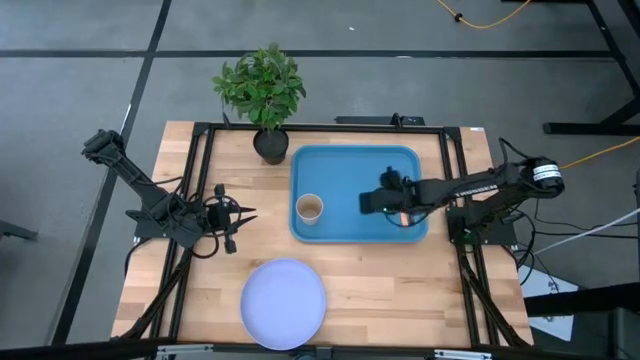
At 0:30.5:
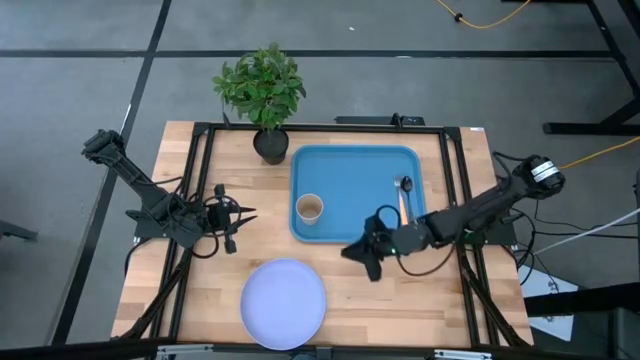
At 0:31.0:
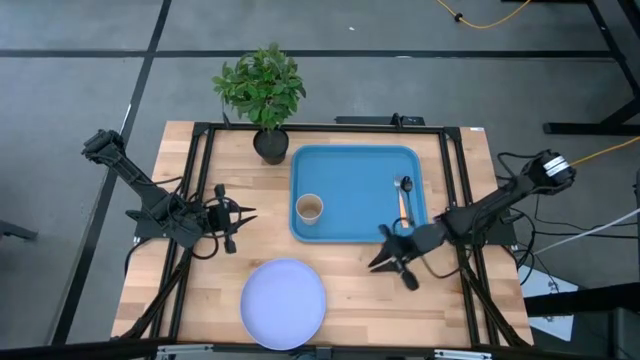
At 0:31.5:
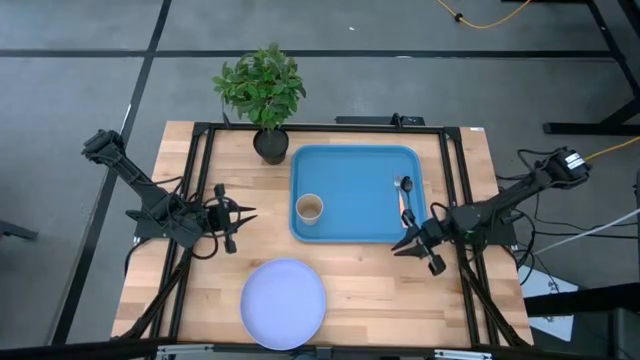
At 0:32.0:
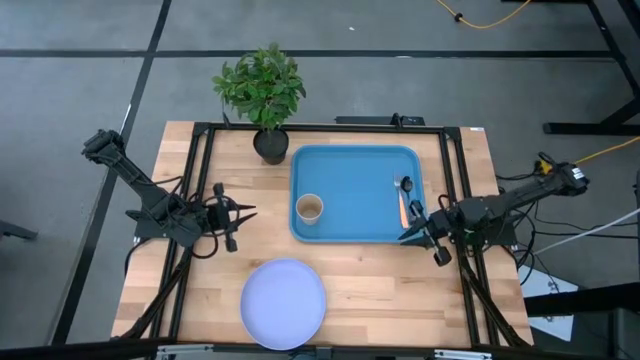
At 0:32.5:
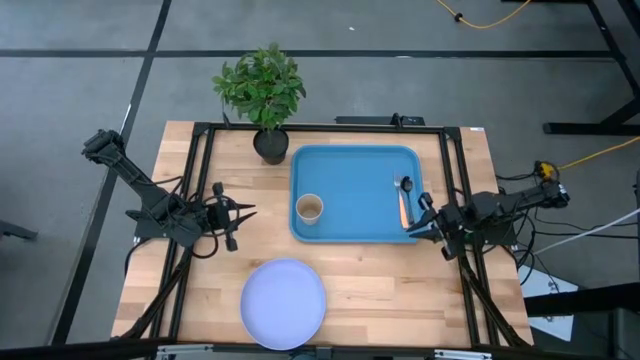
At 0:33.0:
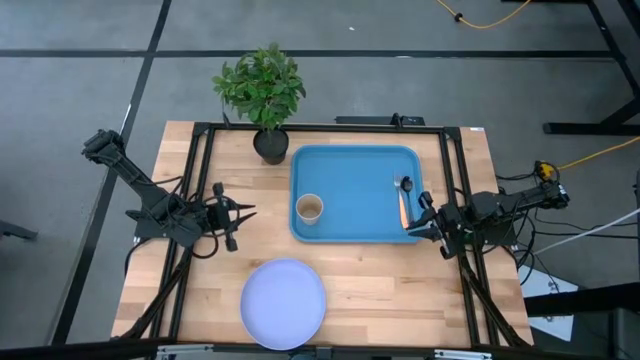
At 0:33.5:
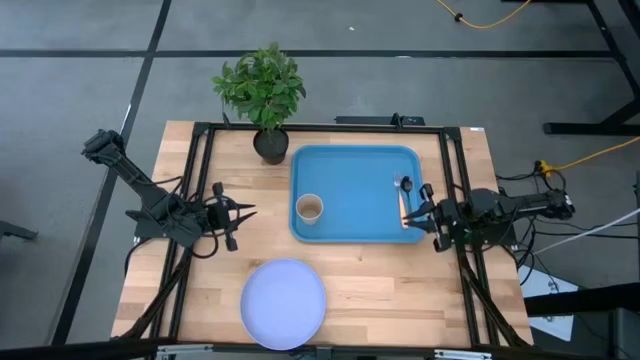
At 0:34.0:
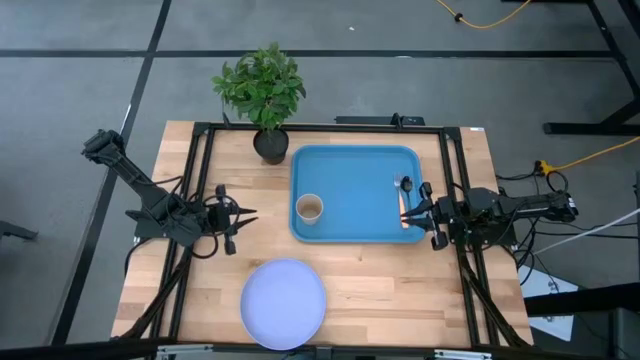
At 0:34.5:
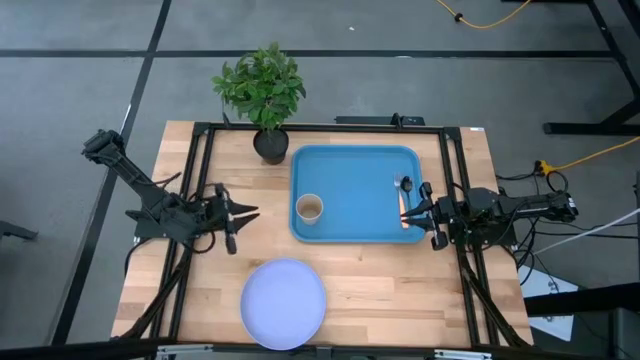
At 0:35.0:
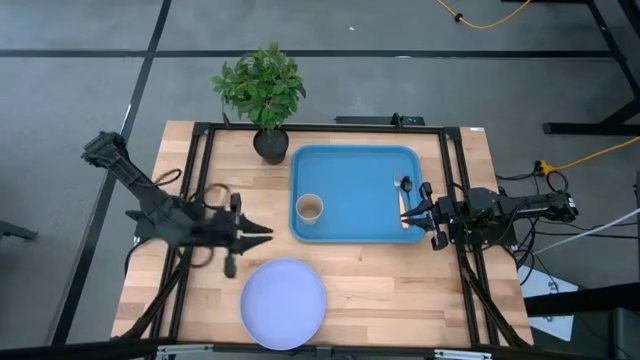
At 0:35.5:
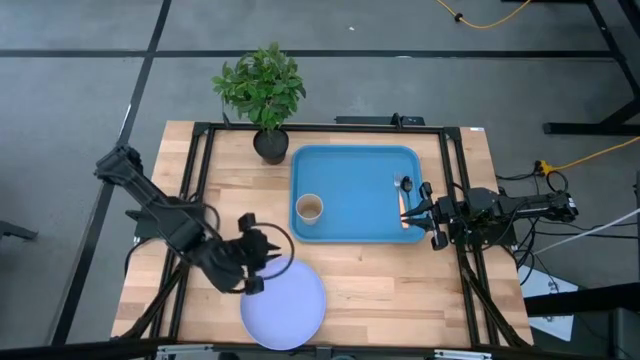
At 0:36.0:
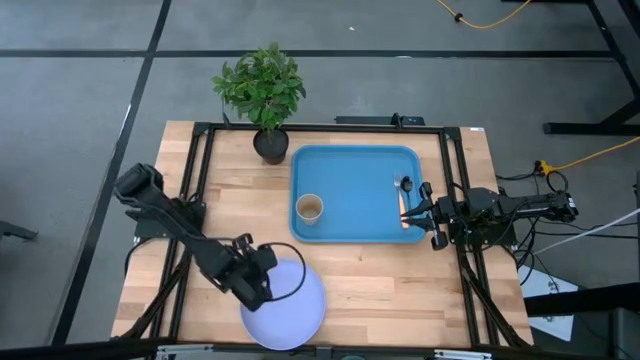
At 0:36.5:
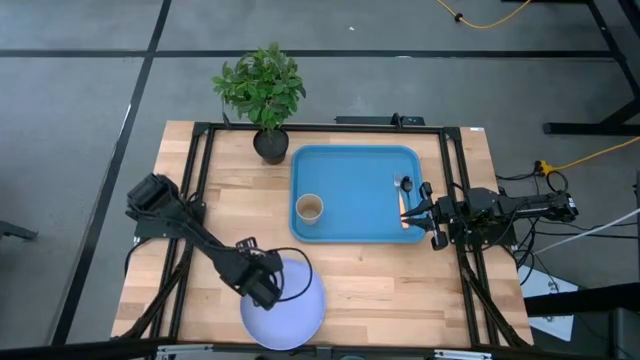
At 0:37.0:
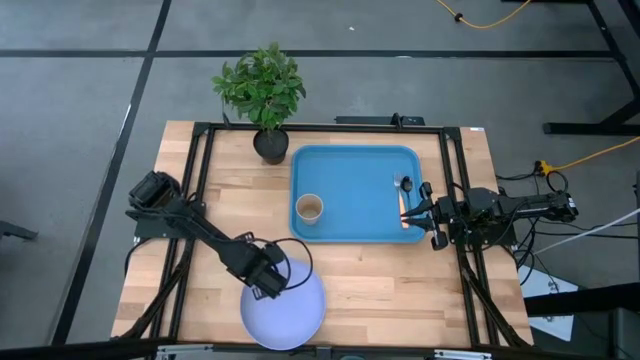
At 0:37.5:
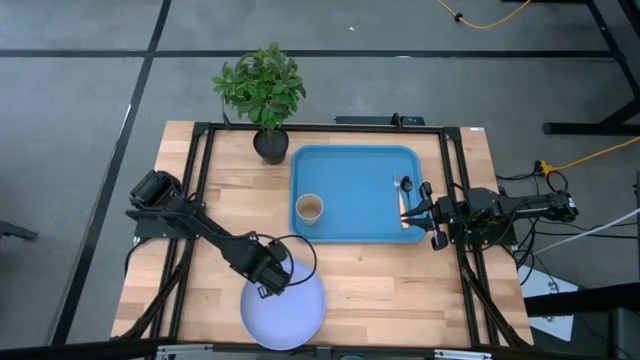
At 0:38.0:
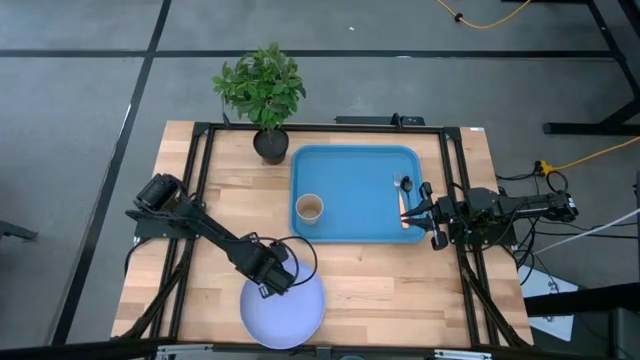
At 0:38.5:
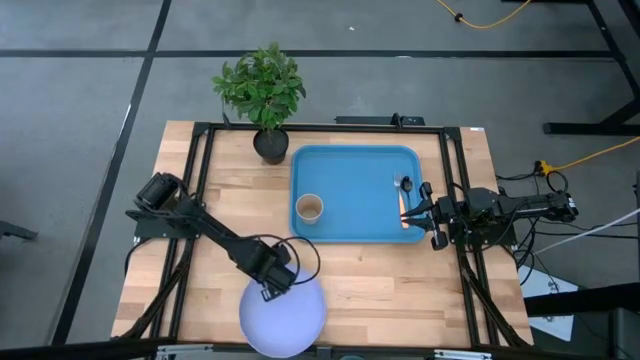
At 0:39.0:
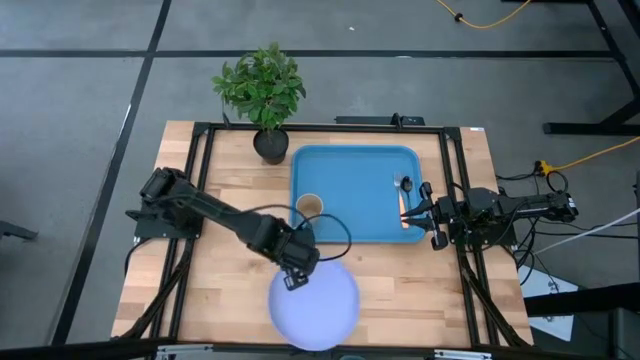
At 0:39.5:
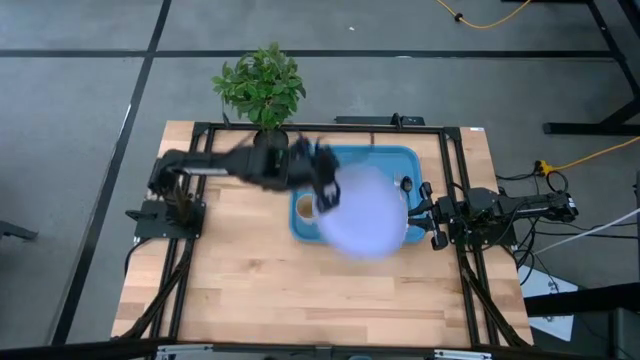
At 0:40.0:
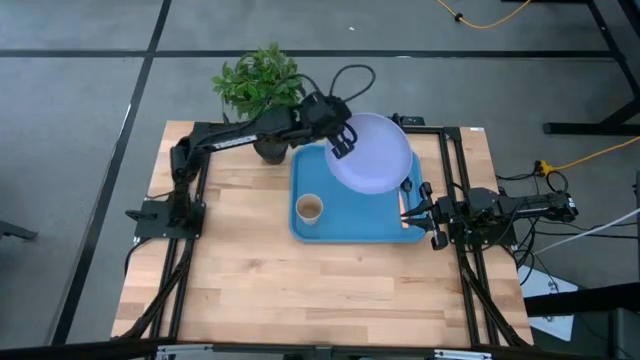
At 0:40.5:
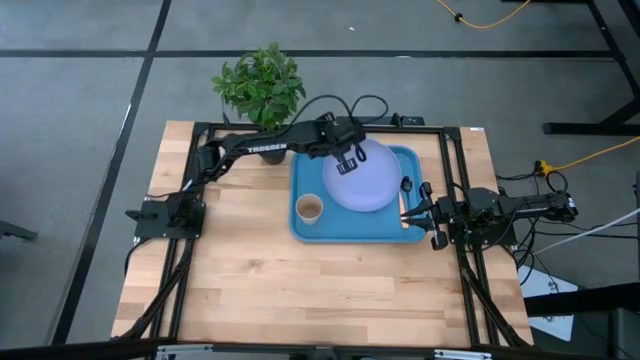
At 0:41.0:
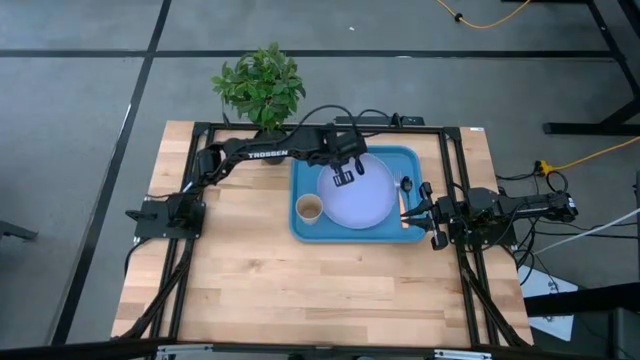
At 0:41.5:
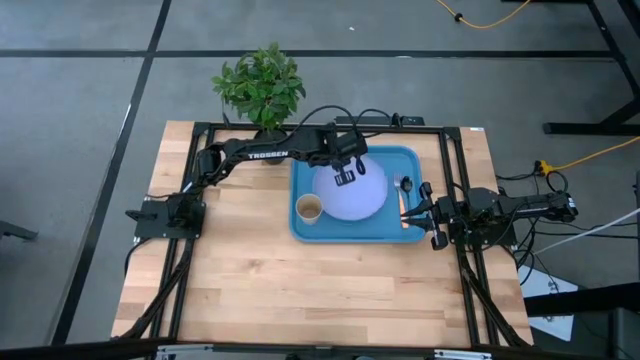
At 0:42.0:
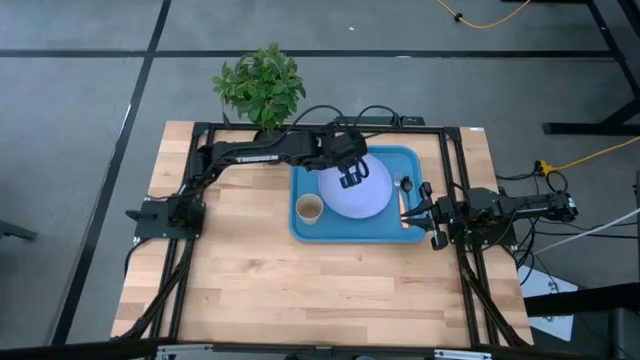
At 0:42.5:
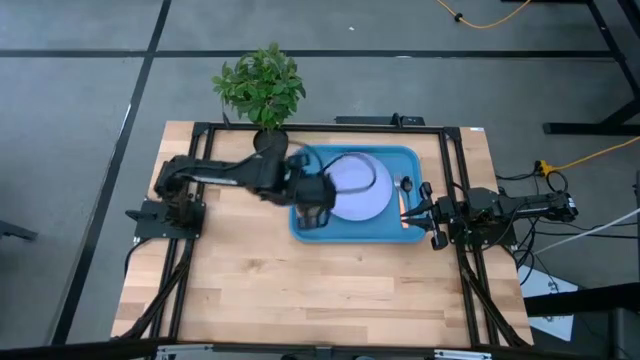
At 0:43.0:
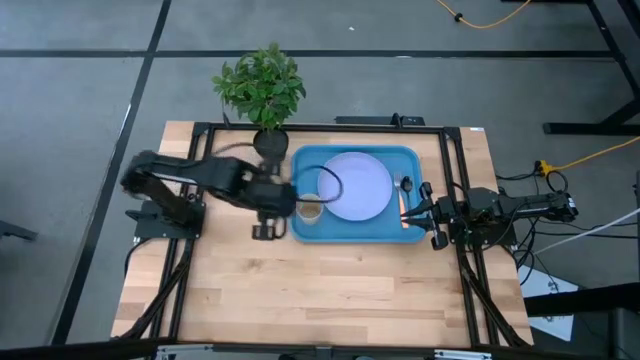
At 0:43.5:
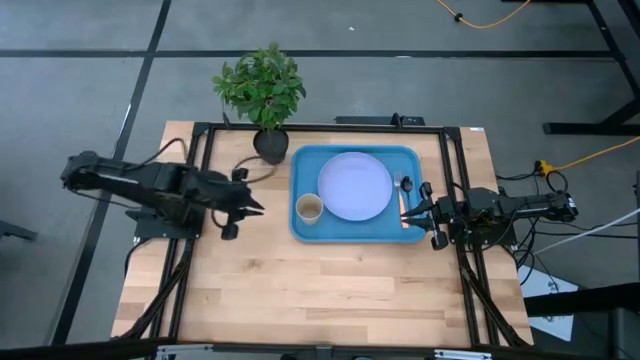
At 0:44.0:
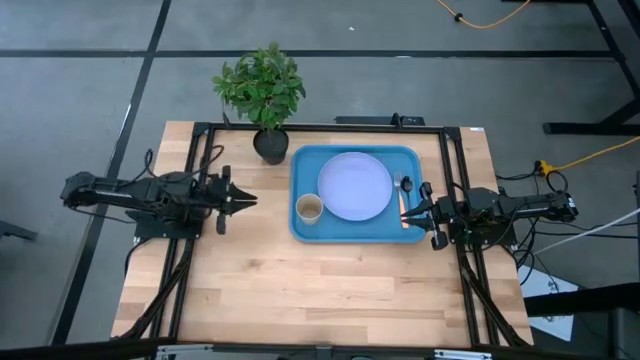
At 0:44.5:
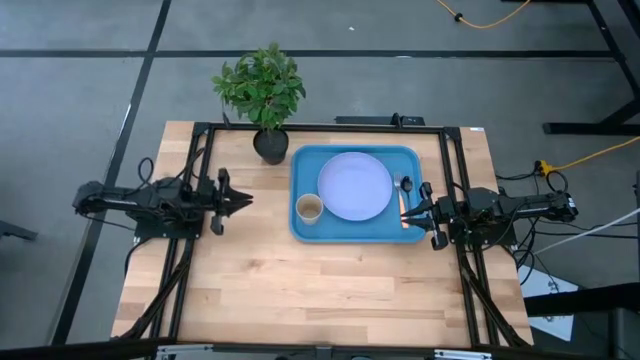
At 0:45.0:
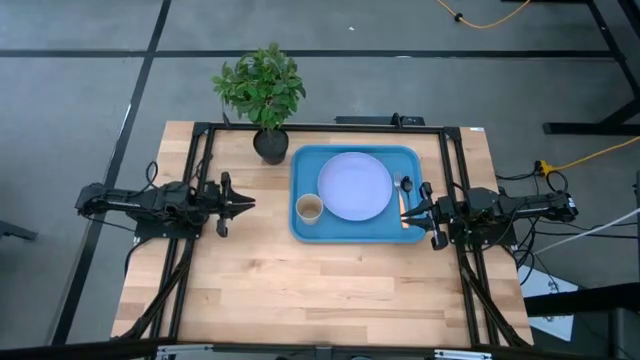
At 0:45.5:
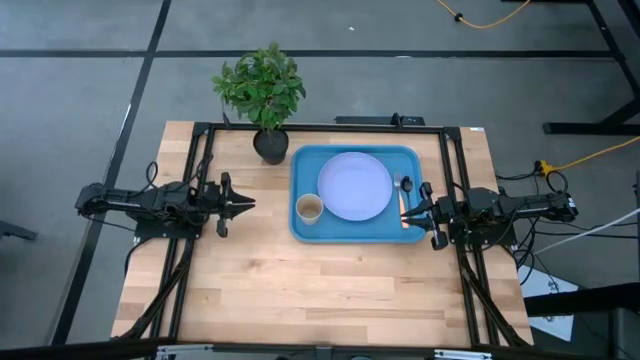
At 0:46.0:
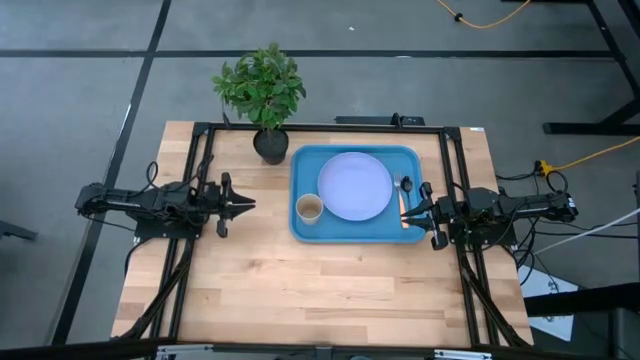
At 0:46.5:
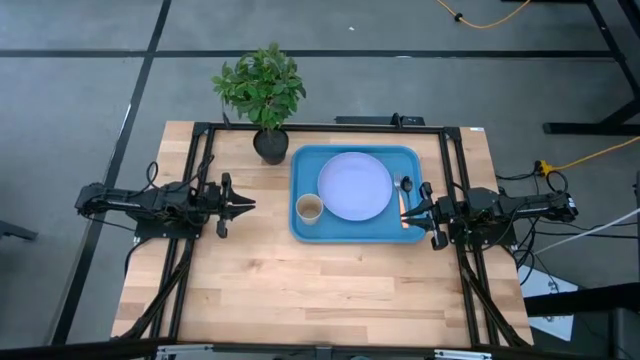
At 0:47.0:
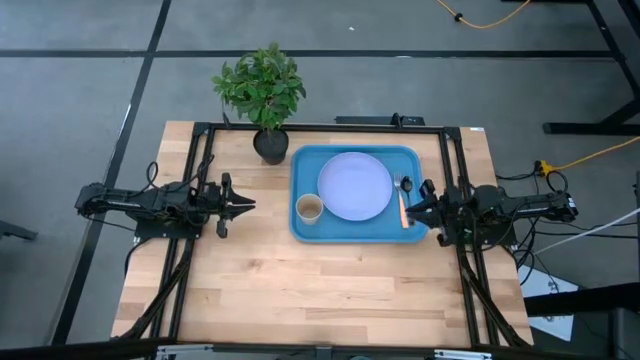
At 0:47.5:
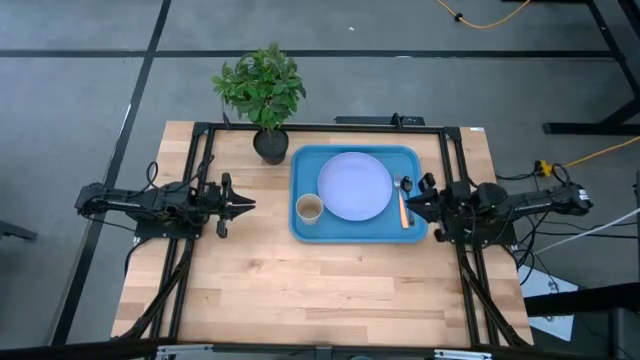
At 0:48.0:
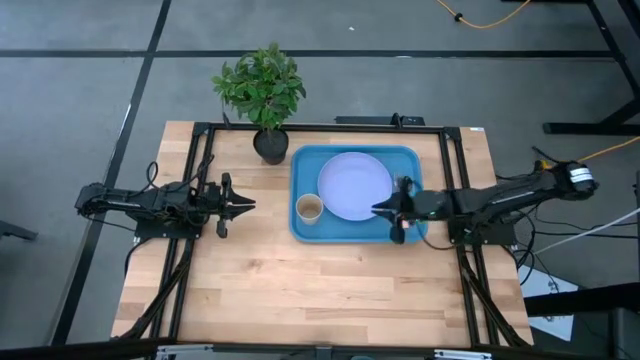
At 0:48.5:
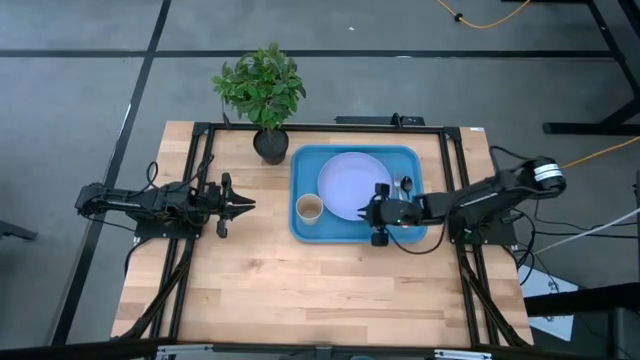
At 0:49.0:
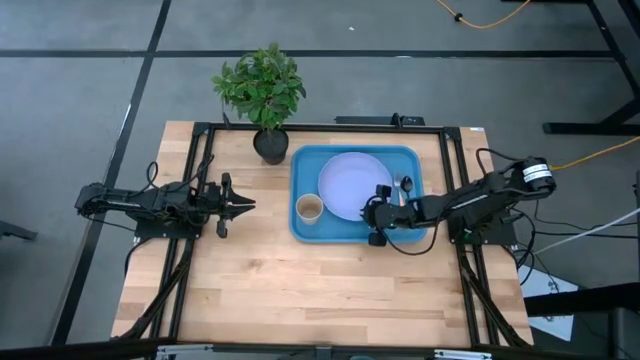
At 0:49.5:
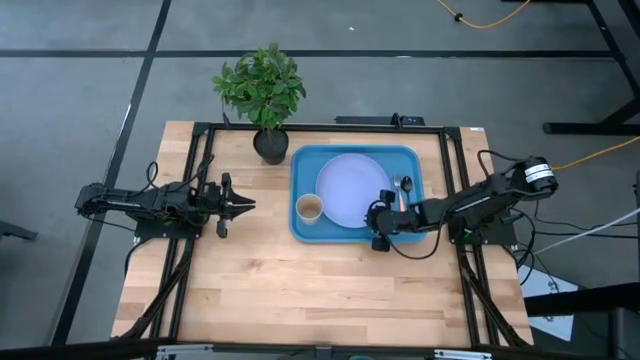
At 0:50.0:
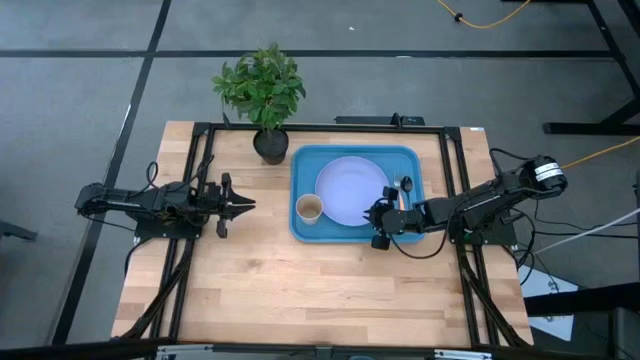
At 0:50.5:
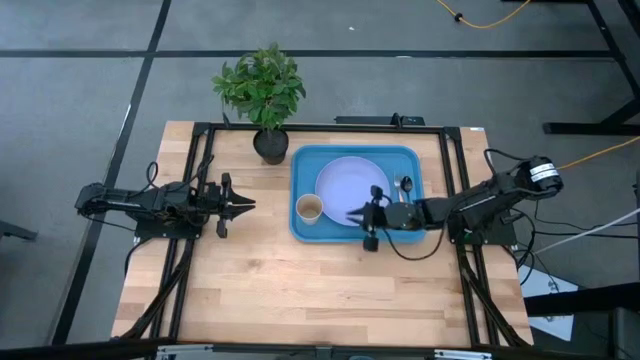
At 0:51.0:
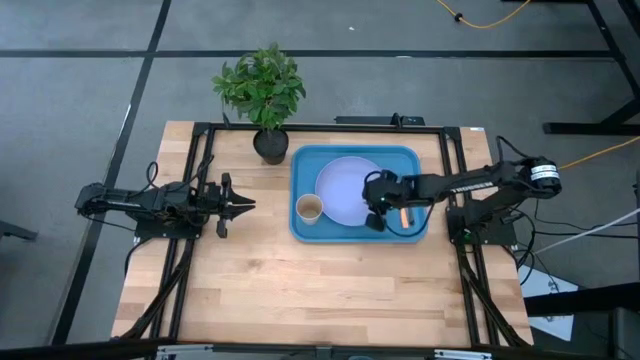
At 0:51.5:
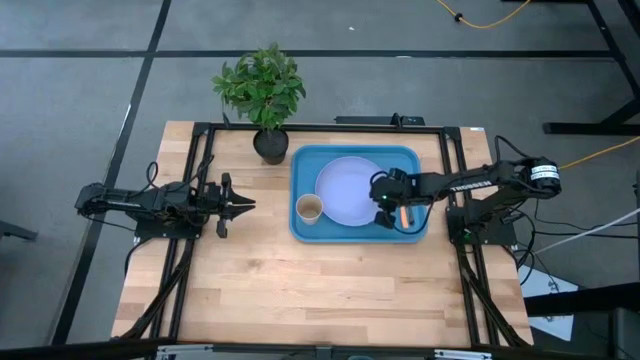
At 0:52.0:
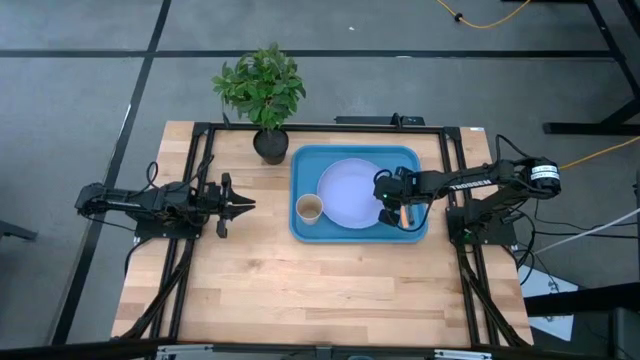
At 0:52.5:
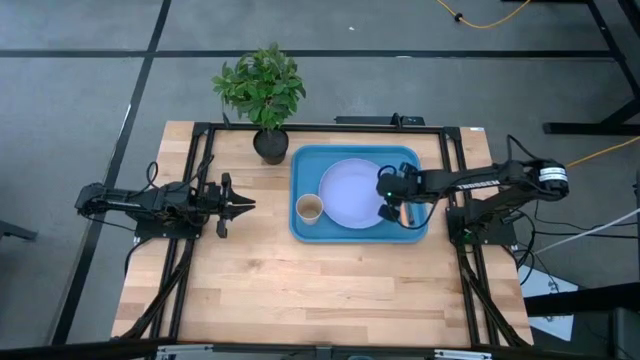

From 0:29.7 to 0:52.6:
Task: Pick and place plate/cup/fork/spoon on tray
Put the plate on the center of the tray
